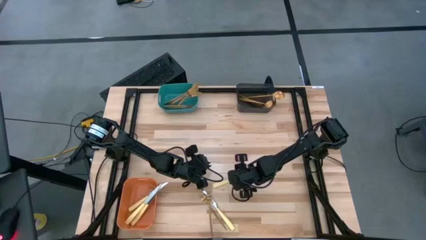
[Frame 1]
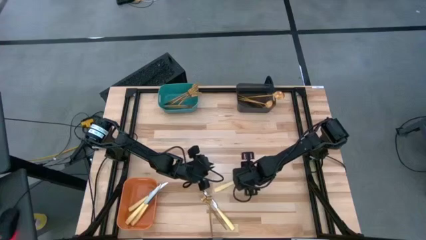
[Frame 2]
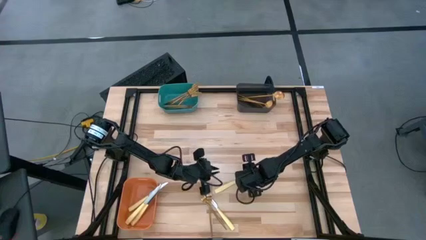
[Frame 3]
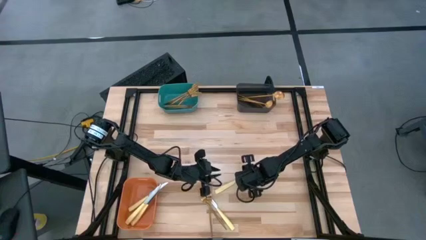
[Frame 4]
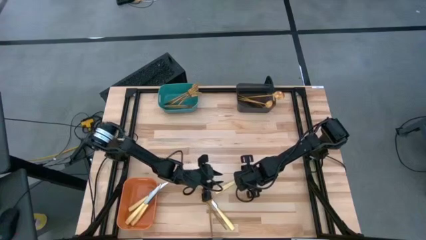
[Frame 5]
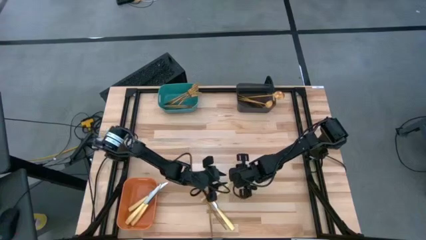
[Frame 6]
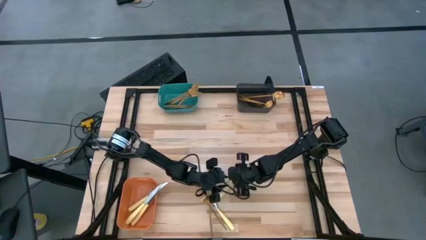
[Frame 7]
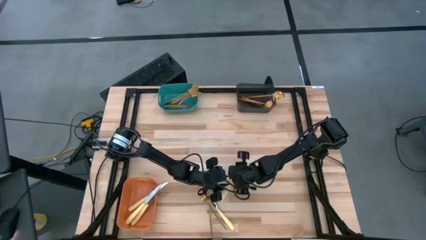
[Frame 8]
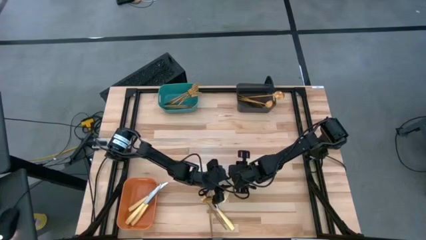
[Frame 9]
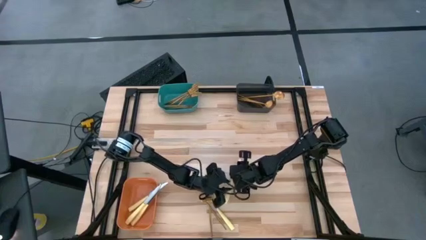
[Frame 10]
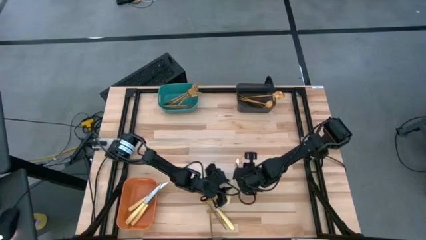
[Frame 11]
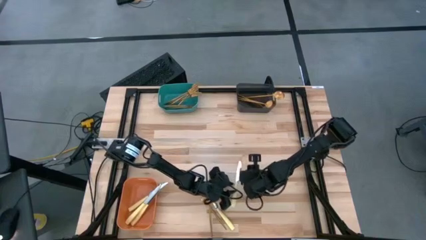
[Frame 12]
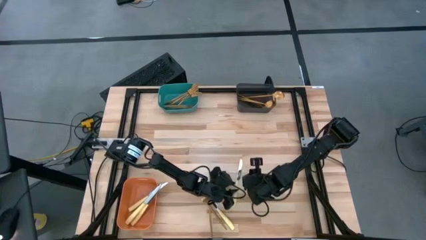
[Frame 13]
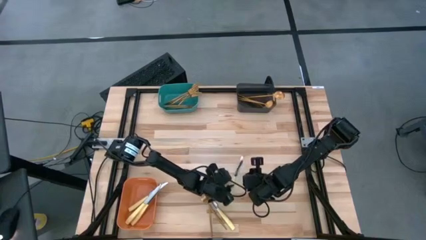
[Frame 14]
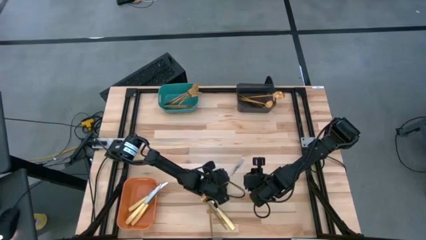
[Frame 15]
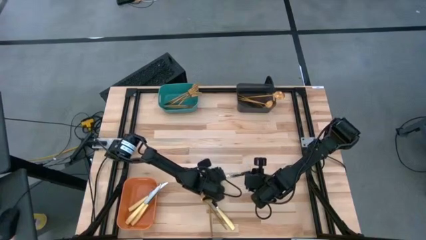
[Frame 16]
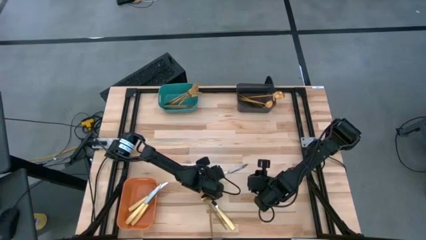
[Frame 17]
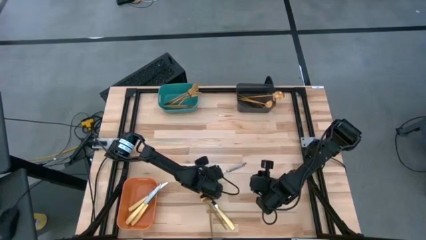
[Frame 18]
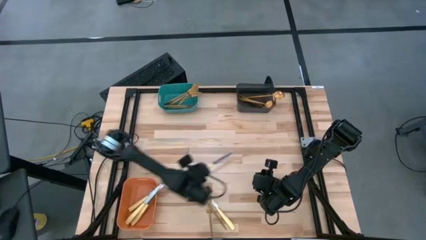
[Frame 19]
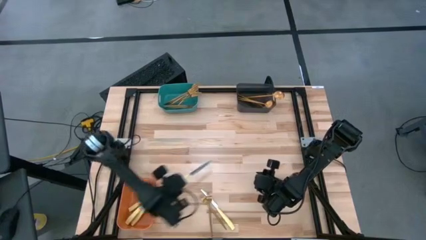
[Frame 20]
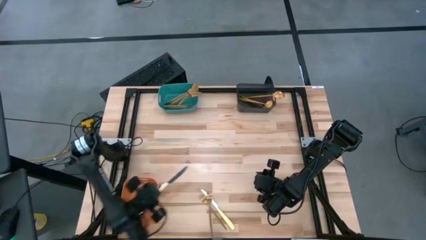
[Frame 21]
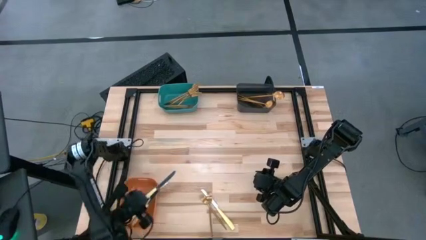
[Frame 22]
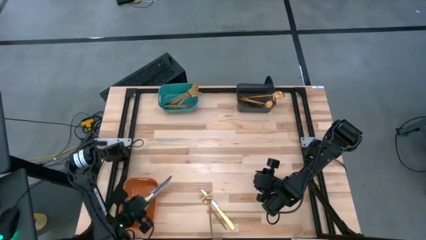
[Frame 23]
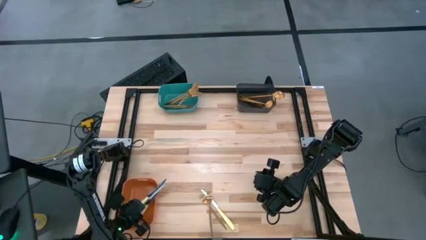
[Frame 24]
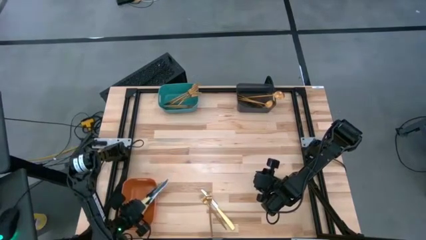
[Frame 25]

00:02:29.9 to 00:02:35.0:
Task: Sort silverware by color (type)
Put the yellow table knife into the orange bin

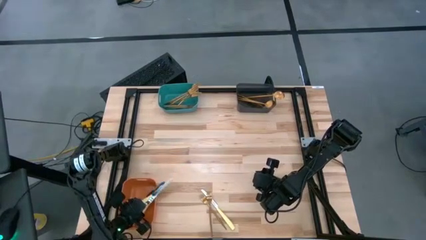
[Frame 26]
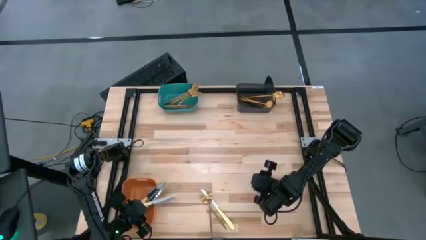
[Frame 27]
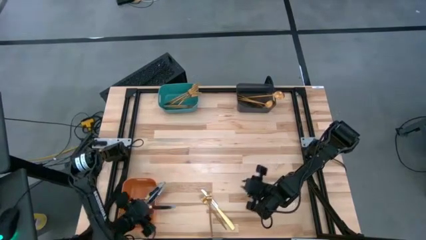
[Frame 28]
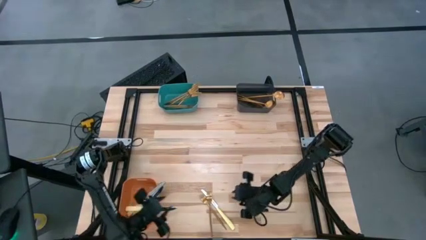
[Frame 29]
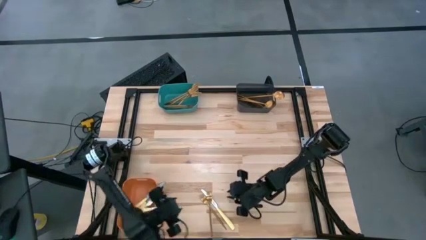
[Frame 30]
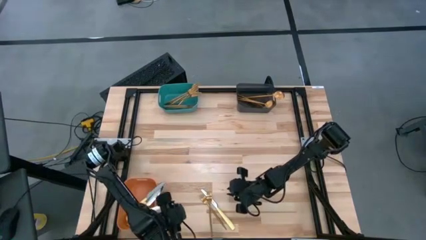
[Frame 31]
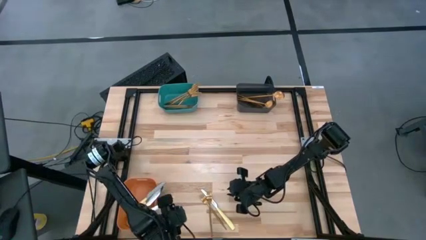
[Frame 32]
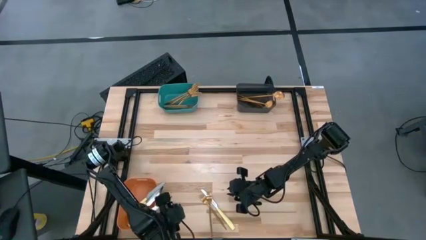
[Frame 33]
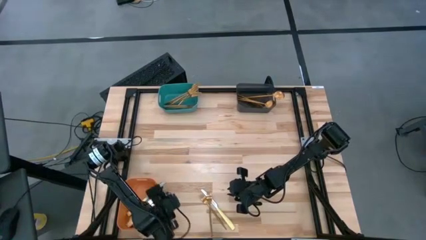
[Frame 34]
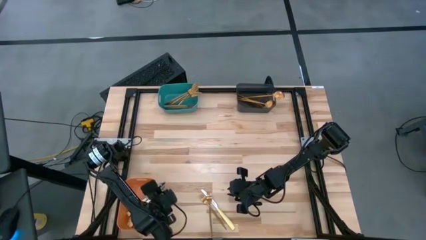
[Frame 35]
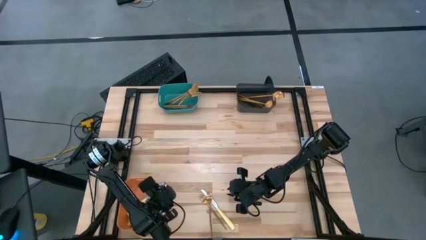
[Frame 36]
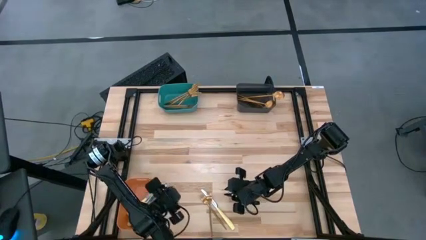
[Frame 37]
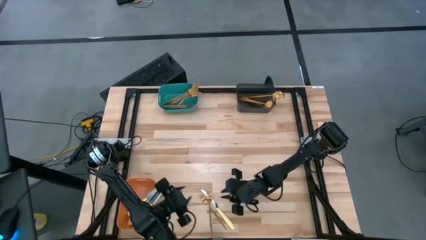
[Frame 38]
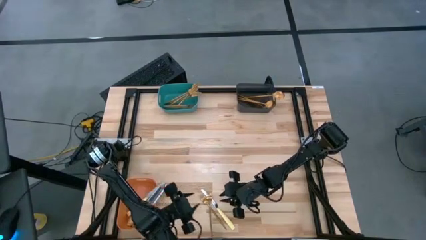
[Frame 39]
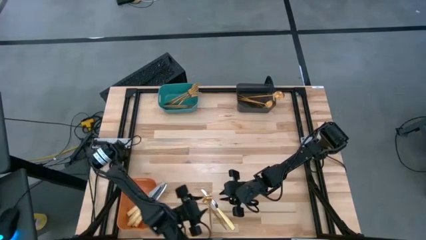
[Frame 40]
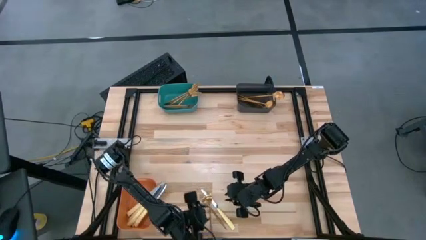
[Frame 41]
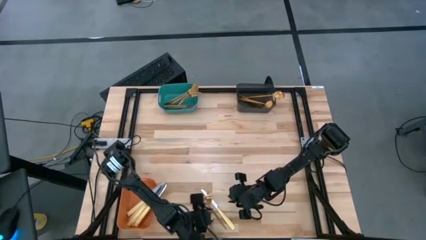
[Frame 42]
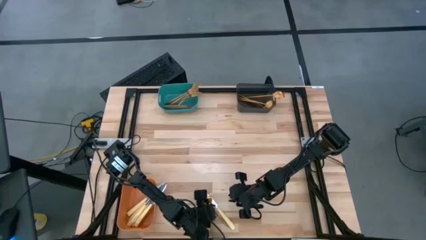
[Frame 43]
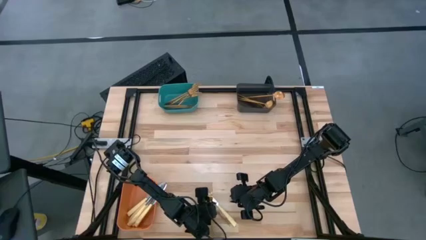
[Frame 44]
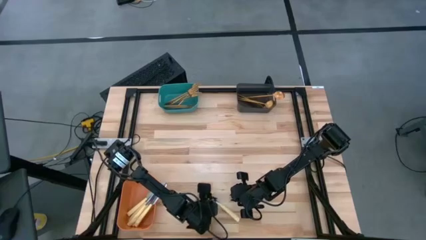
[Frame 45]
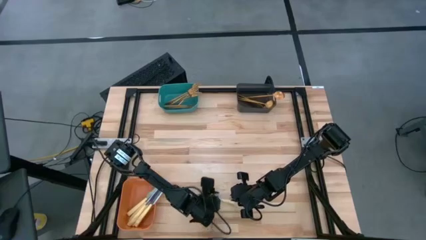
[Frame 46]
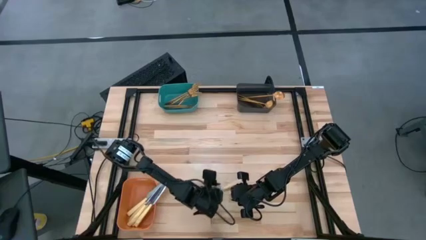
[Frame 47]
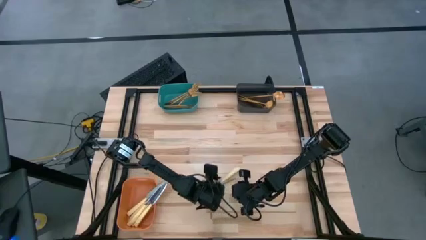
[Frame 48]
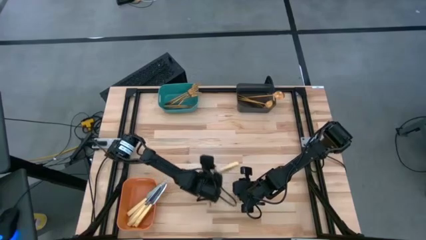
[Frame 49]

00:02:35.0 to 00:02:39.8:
Move the silverware to the center of the table

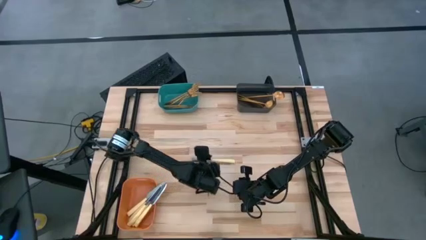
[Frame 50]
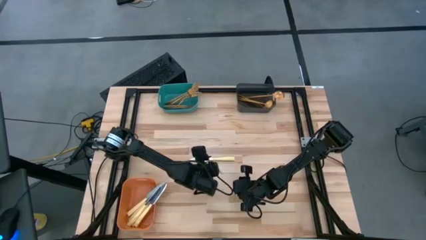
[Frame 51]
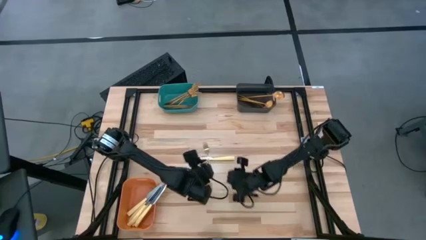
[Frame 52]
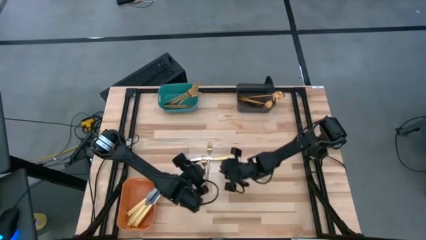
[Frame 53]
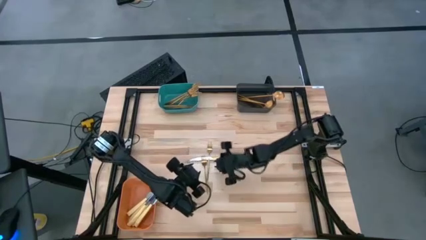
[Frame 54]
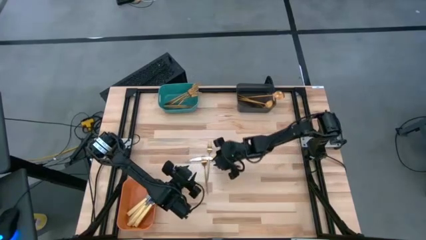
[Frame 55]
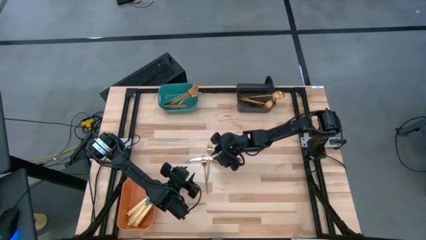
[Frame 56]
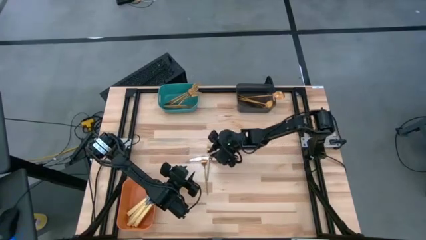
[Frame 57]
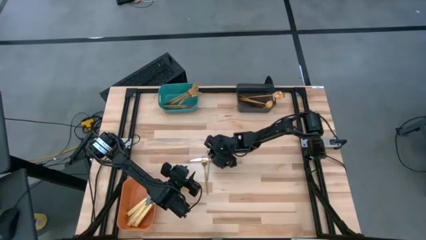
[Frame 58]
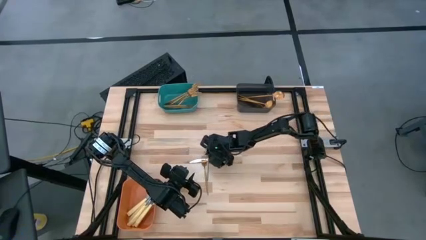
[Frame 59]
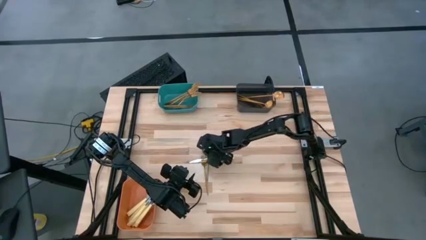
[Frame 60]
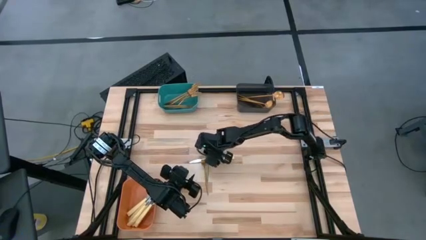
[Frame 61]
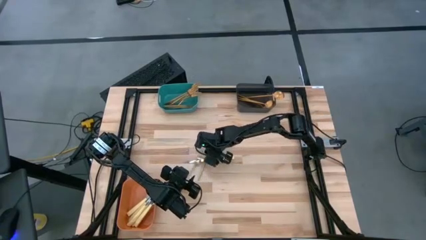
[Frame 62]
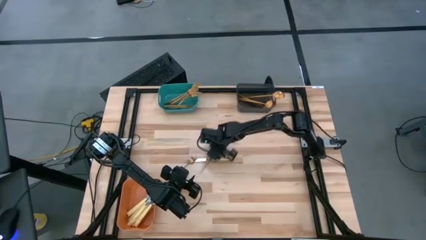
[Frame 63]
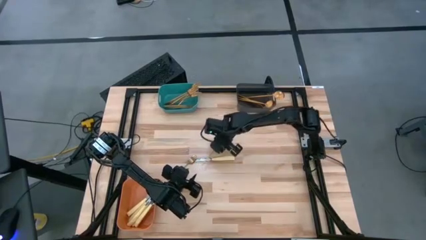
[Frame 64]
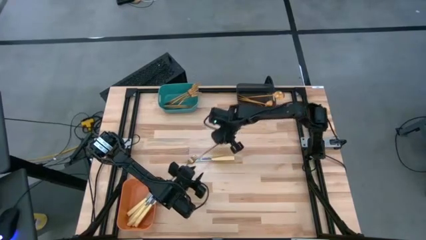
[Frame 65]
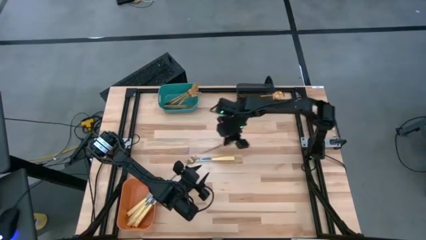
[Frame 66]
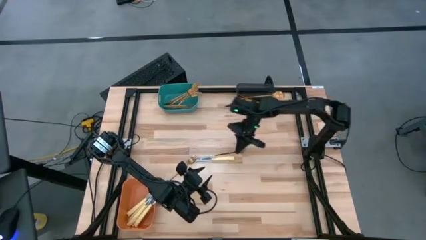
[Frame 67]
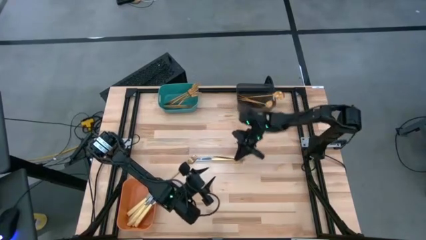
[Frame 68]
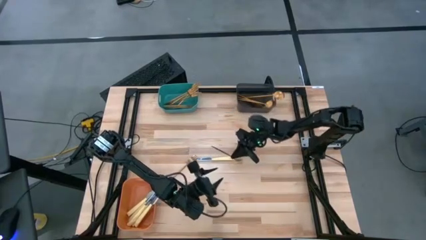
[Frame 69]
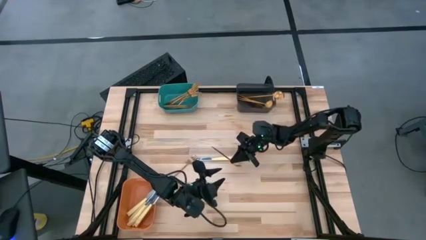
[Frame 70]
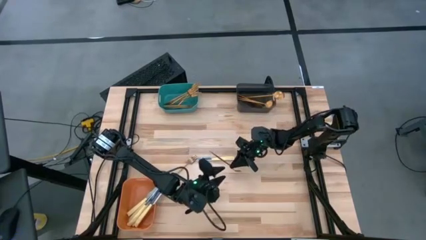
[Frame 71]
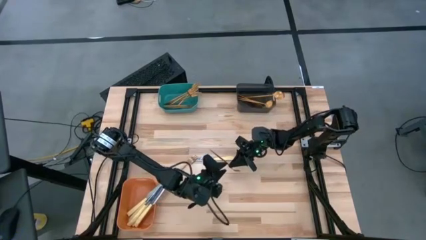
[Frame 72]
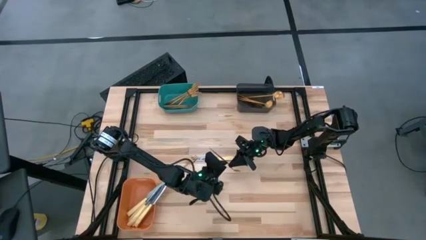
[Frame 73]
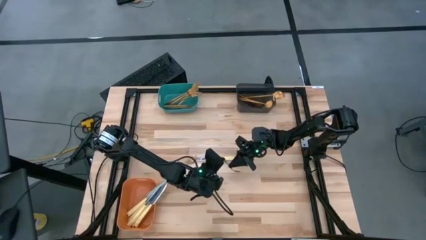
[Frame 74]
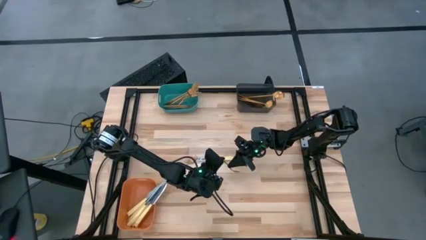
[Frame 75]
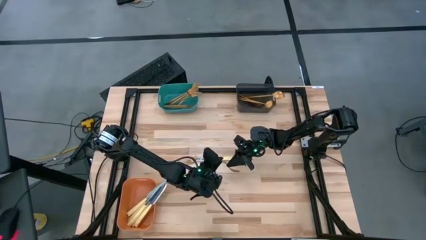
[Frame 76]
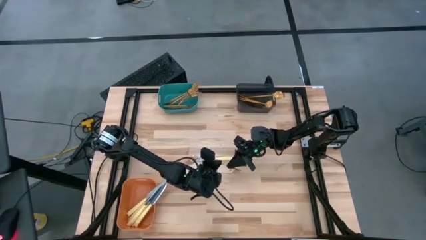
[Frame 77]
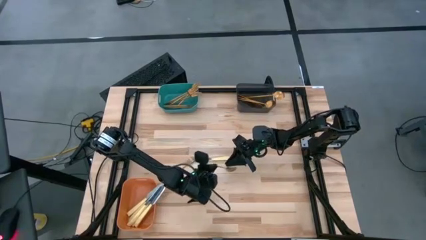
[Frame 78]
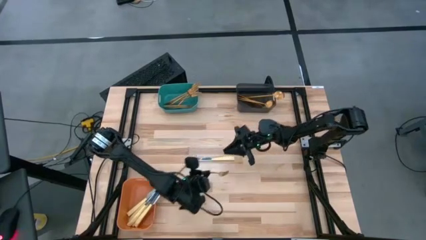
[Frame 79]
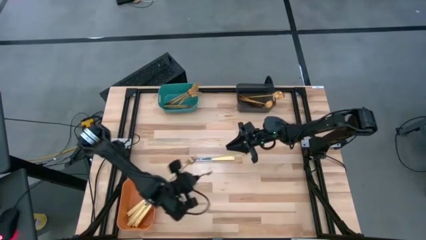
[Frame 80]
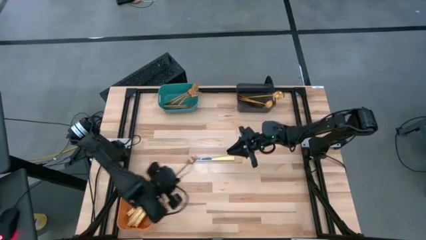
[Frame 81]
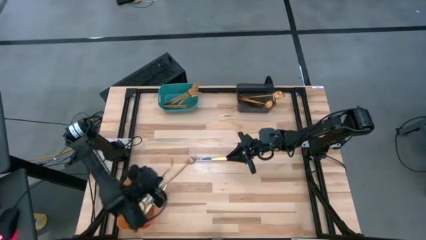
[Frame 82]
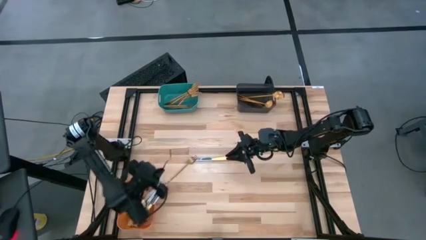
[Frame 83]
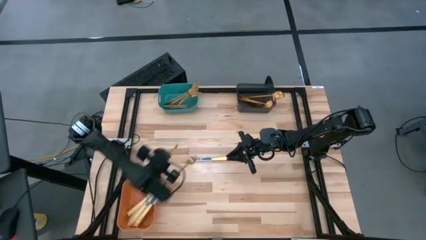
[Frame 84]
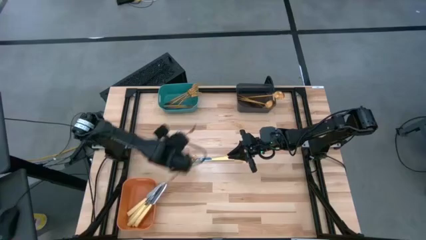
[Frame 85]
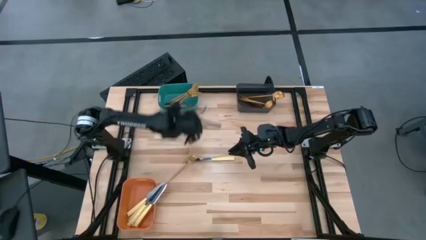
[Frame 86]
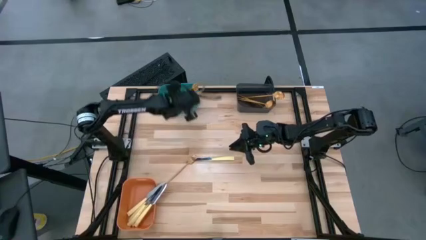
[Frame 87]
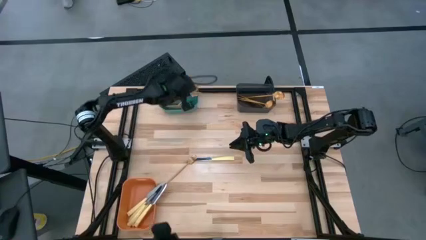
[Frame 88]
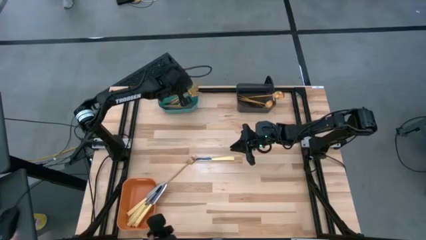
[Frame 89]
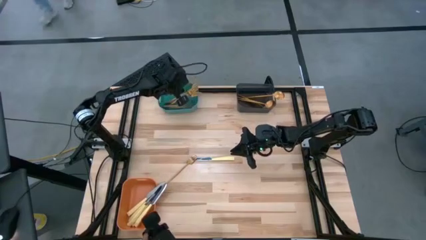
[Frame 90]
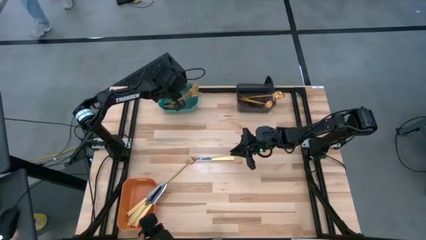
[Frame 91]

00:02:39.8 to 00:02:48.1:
Put the gold fork into the green bin
